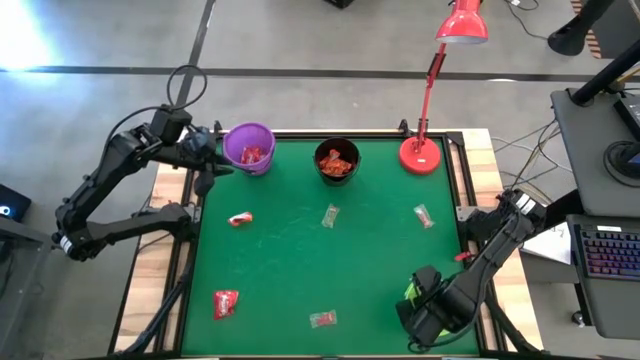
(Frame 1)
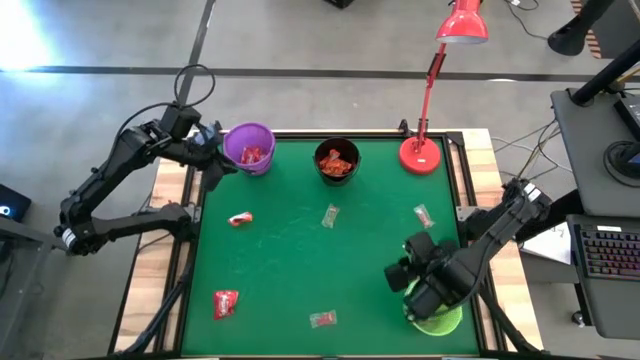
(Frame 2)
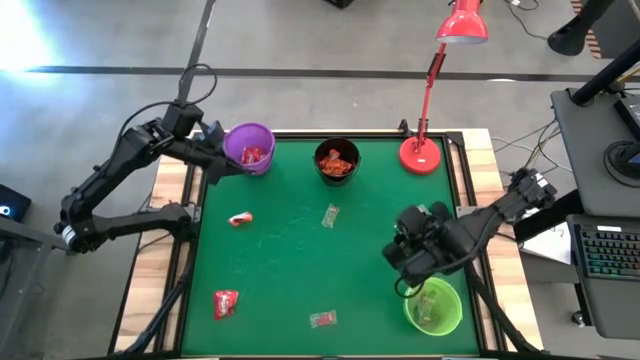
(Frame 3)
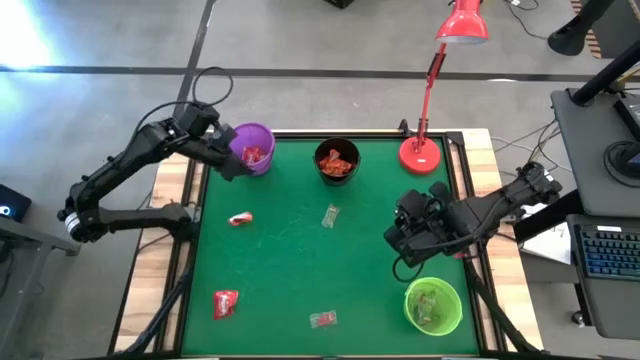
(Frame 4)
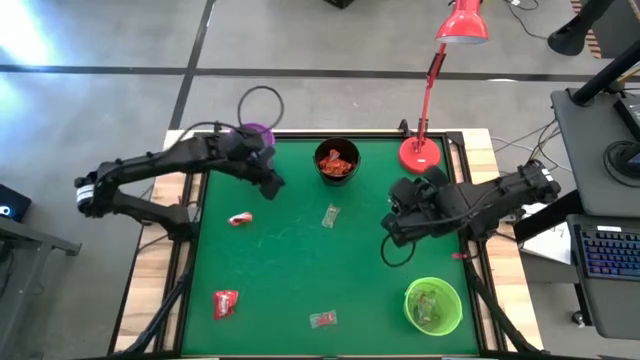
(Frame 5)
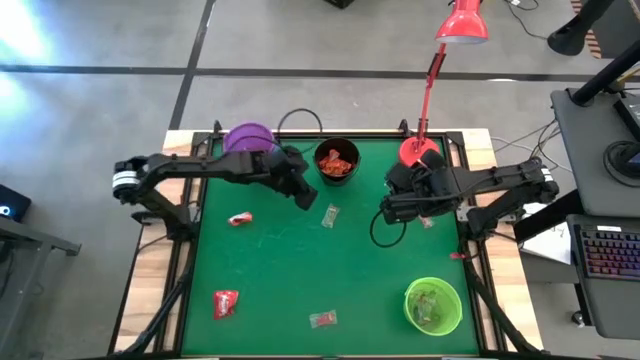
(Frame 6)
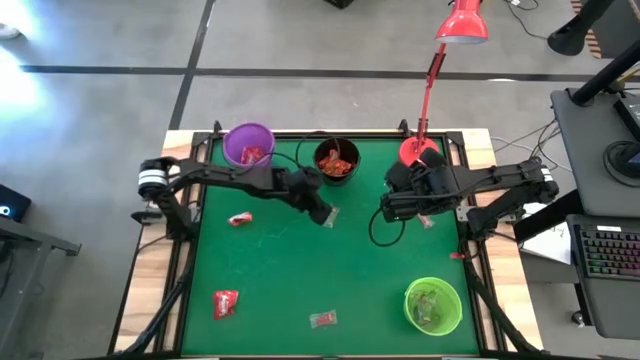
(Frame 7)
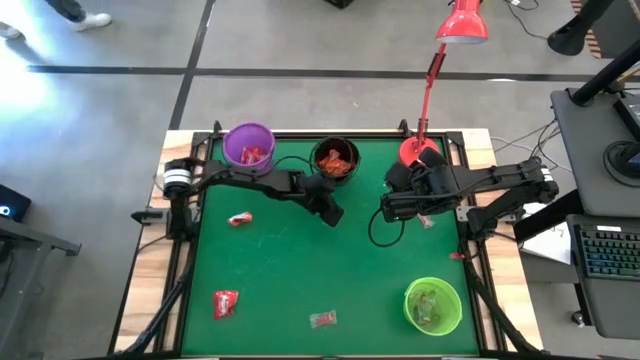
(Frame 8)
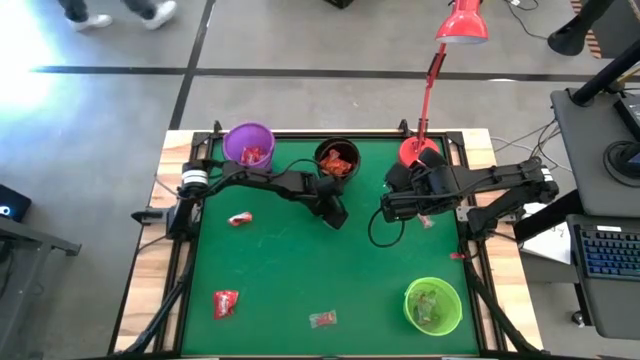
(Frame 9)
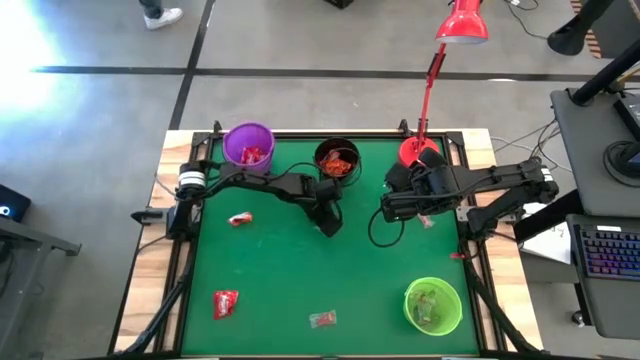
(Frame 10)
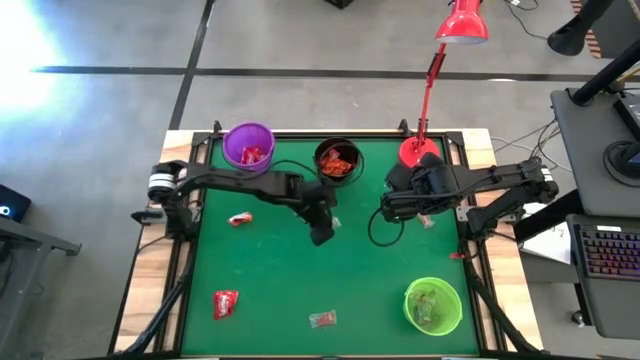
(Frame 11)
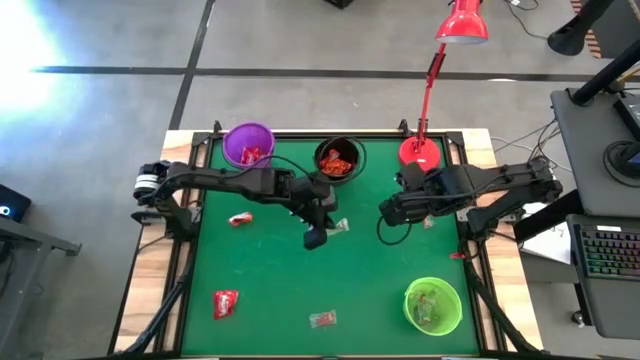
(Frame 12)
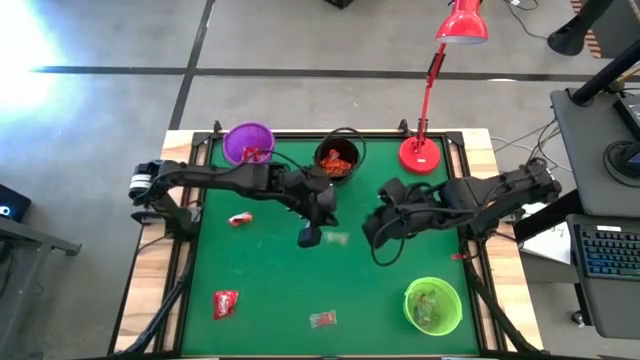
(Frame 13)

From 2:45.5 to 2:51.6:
Task: Sort candy
Put the green gummy into the green bucket

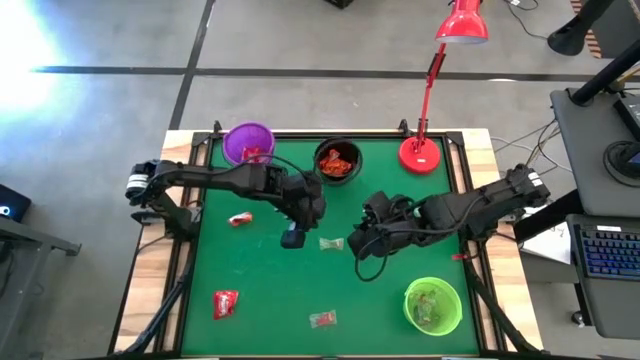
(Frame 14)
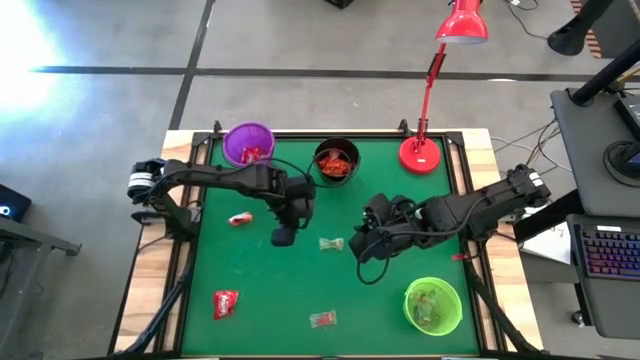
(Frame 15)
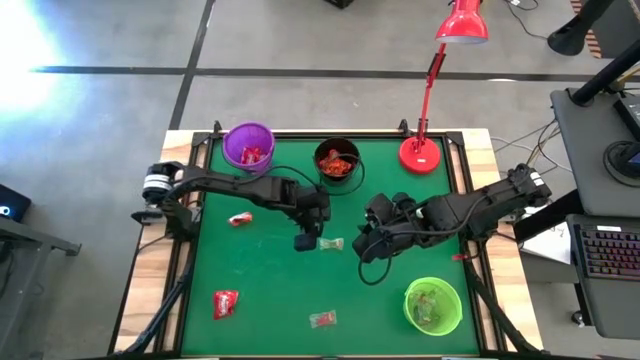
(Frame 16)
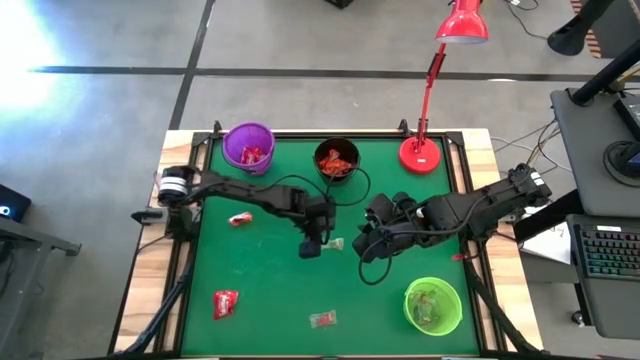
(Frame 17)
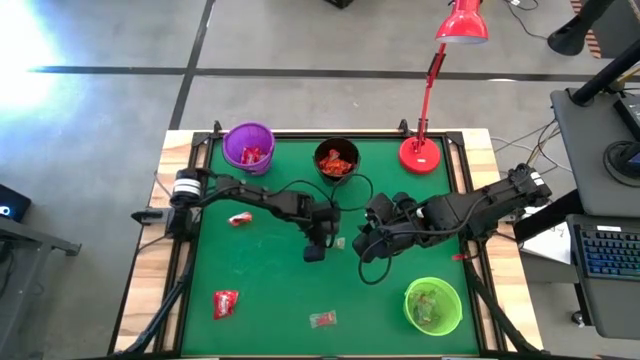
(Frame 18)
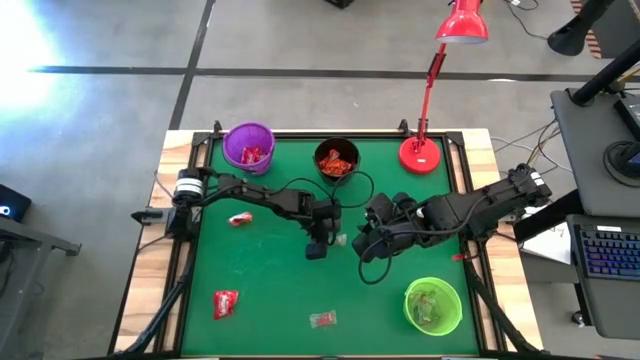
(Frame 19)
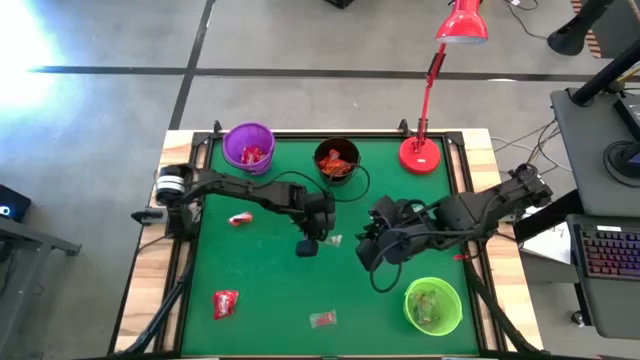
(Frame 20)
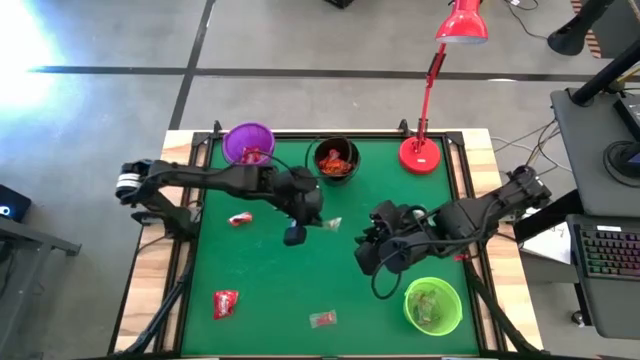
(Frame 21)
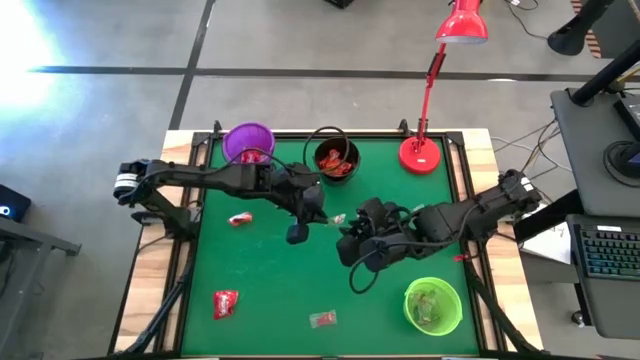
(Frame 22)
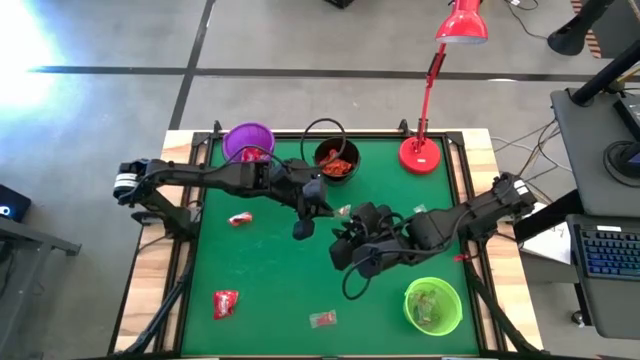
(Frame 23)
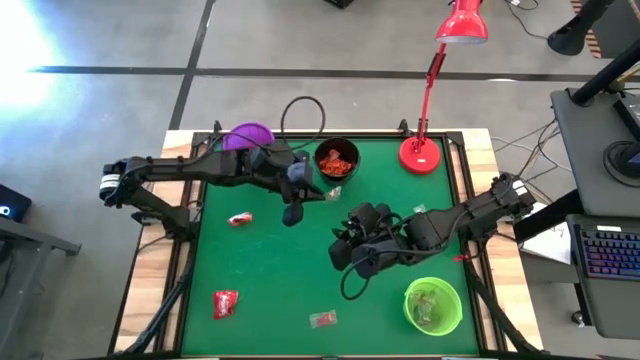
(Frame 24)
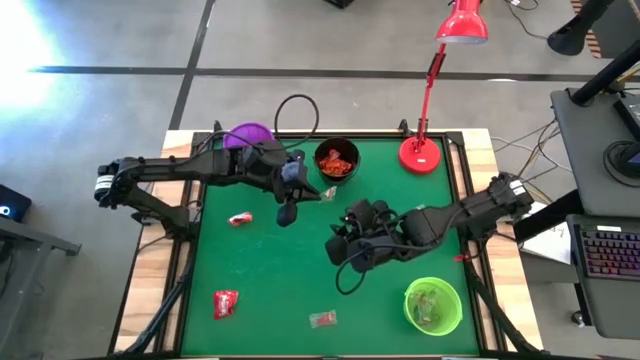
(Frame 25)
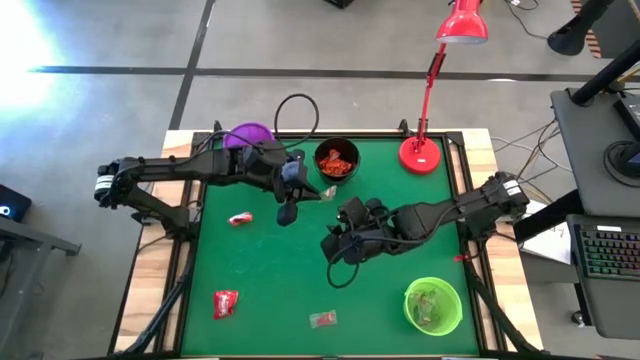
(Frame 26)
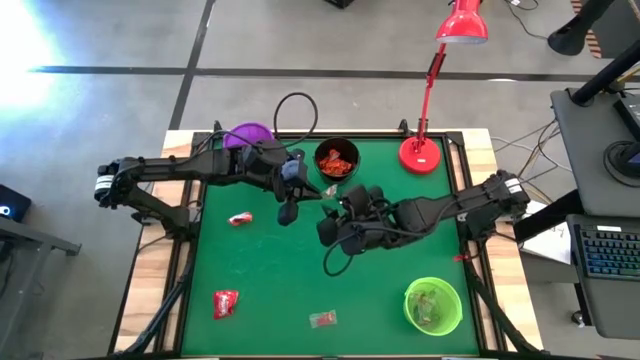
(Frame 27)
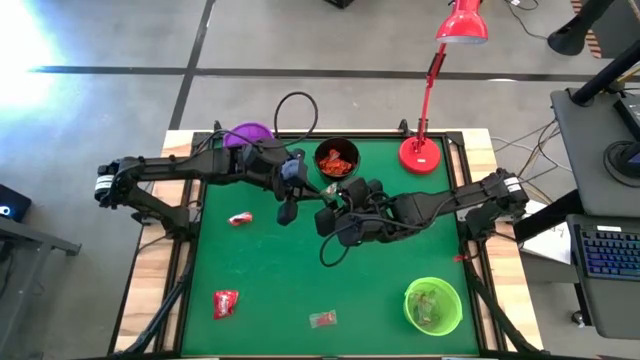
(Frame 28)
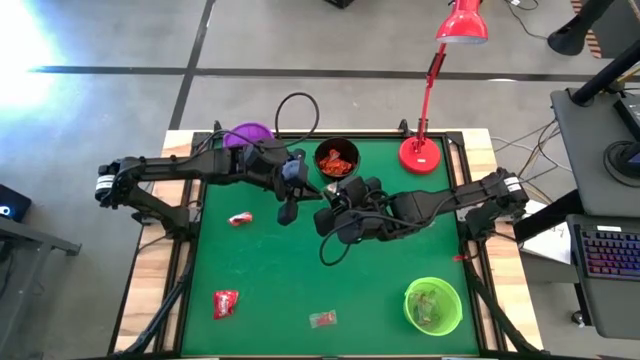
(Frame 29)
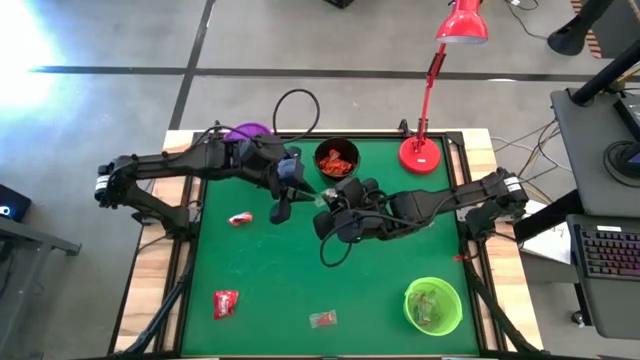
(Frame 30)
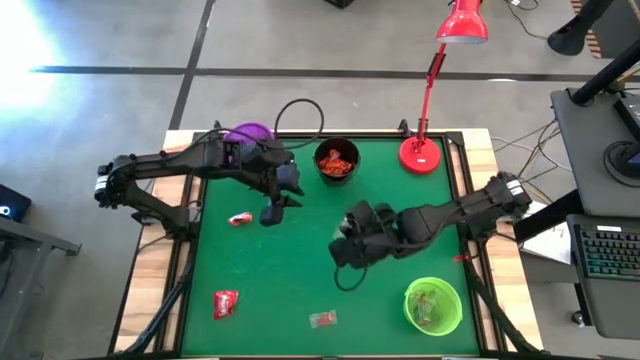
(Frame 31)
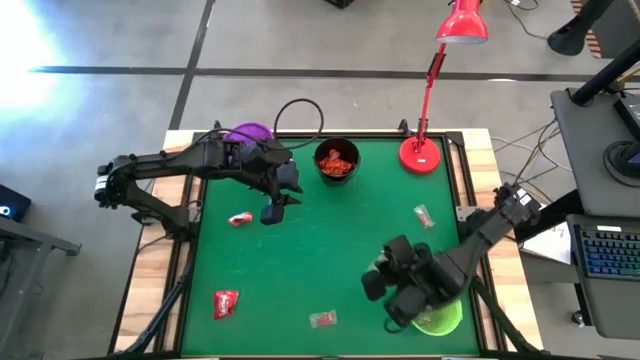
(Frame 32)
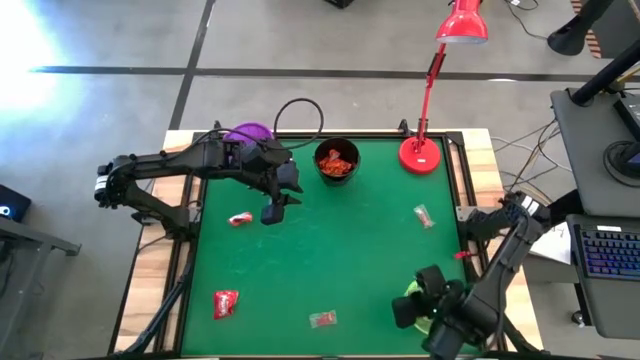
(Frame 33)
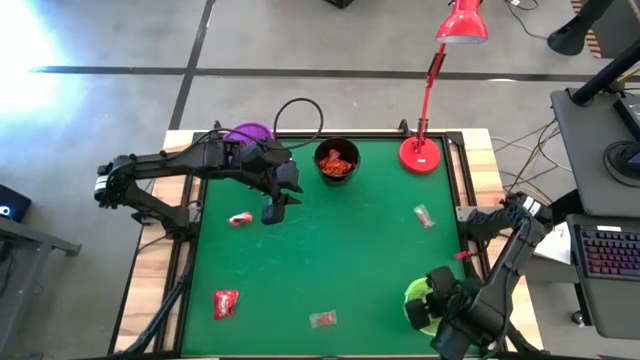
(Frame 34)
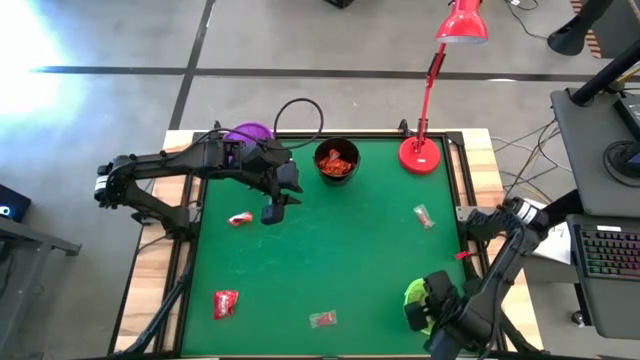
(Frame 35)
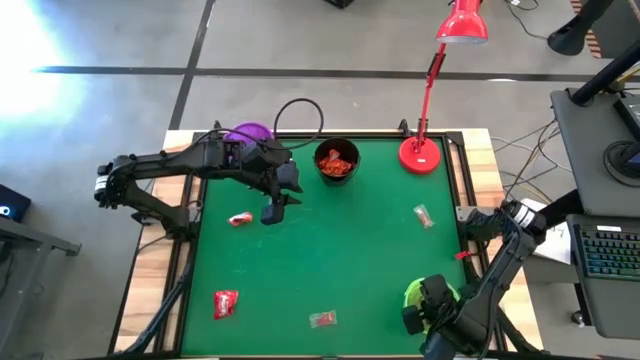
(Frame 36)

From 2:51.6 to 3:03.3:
Put the green gummy into the green bucket

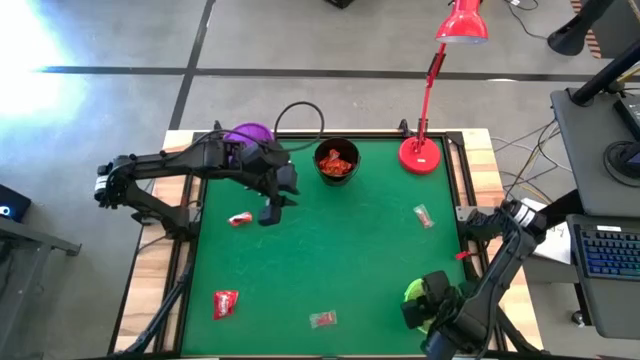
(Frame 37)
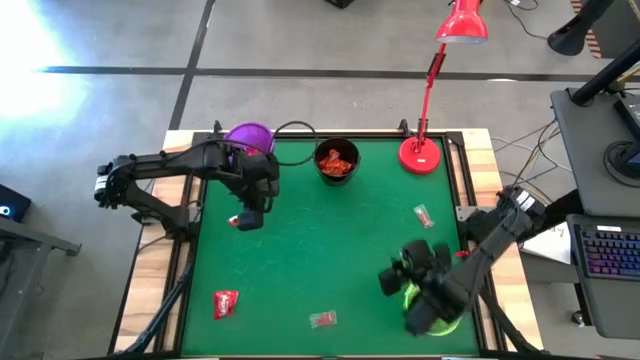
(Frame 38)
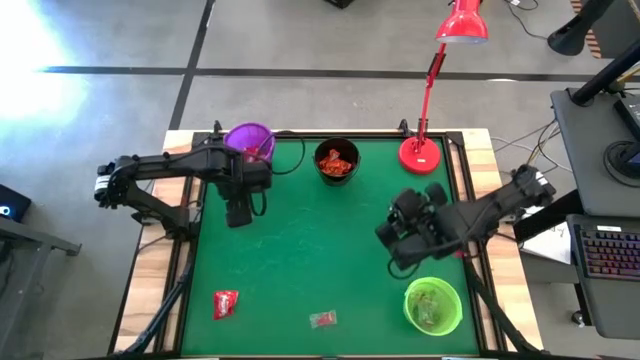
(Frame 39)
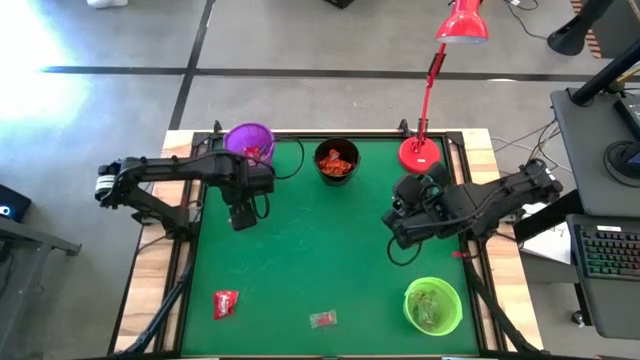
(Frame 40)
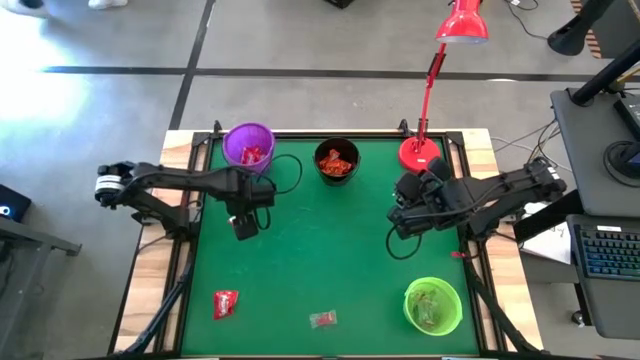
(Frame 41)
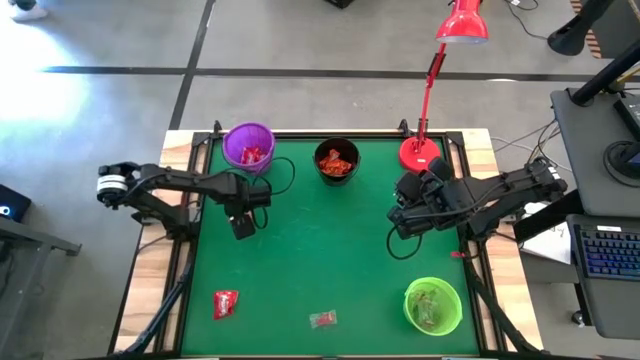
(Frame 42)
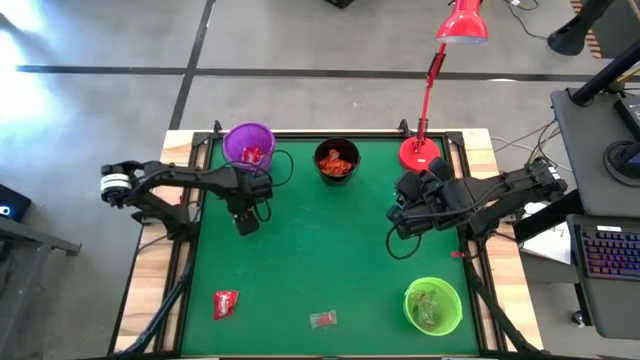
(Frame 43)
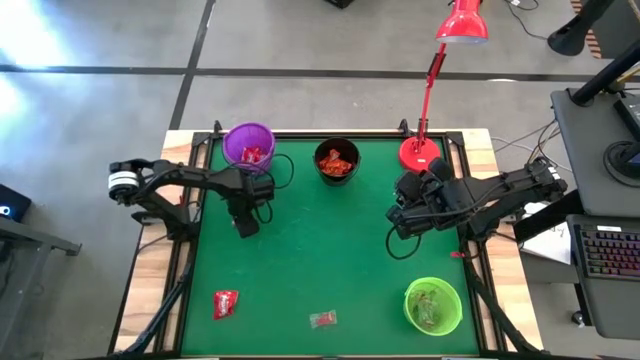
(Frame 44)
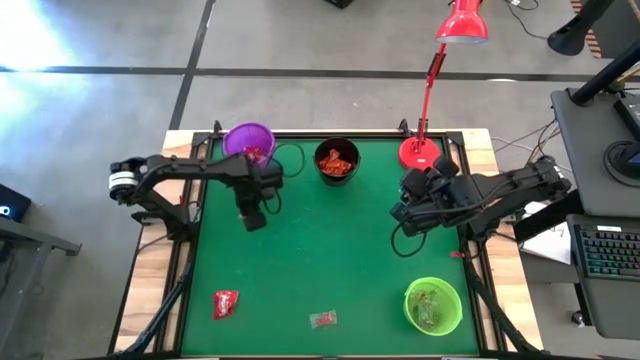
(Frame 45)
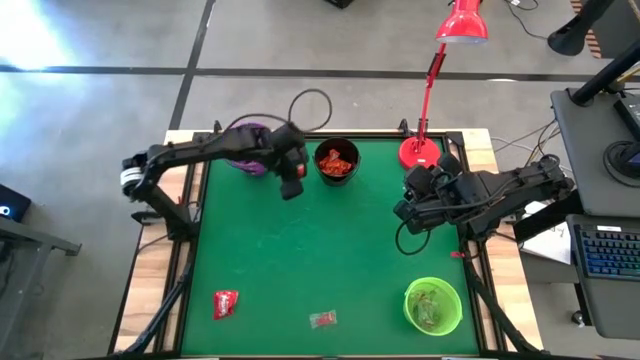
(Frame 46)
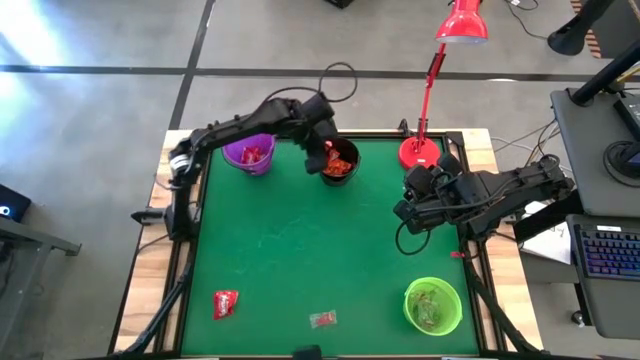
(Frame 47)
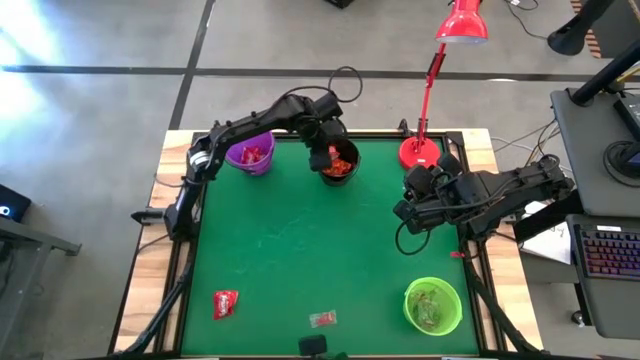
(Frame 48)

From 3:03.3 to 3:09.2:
Put the orange candy into the black bucket
